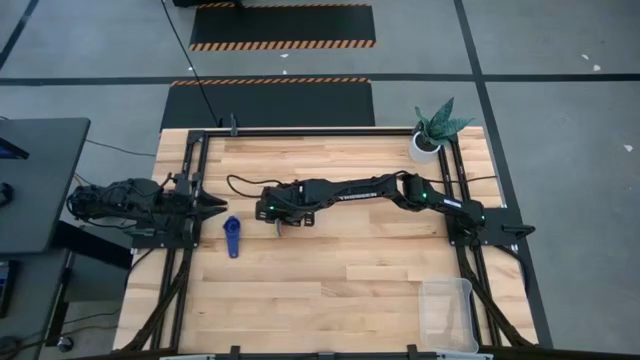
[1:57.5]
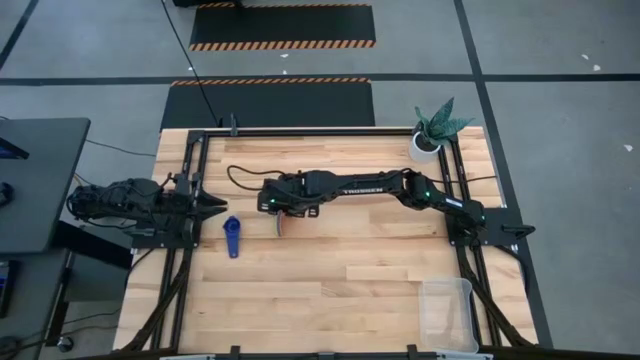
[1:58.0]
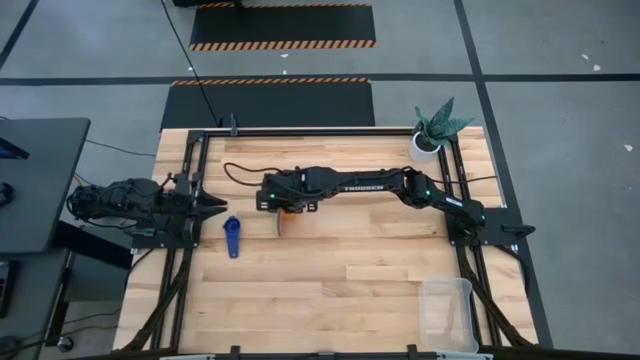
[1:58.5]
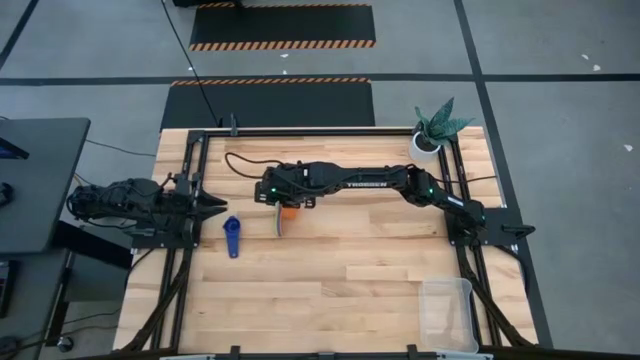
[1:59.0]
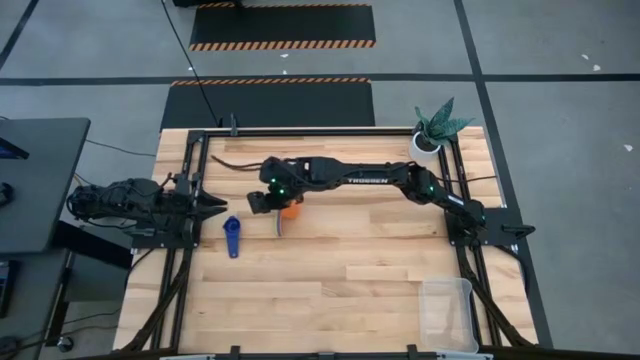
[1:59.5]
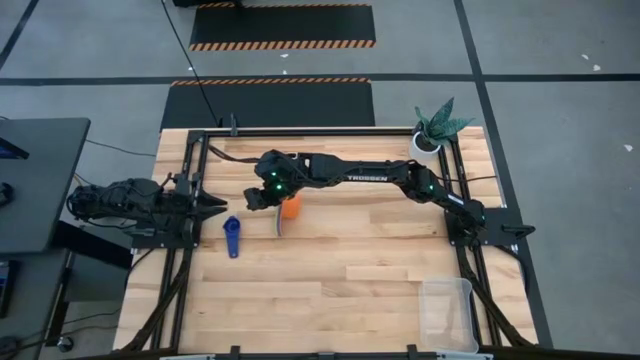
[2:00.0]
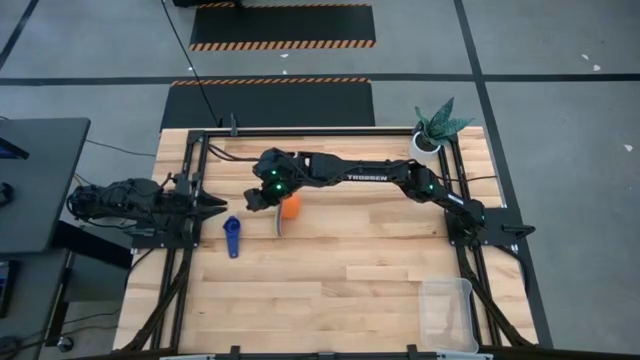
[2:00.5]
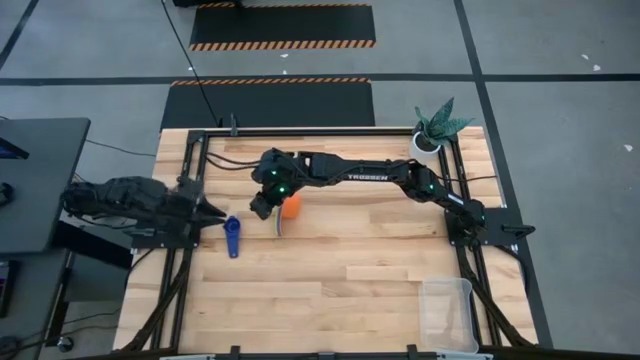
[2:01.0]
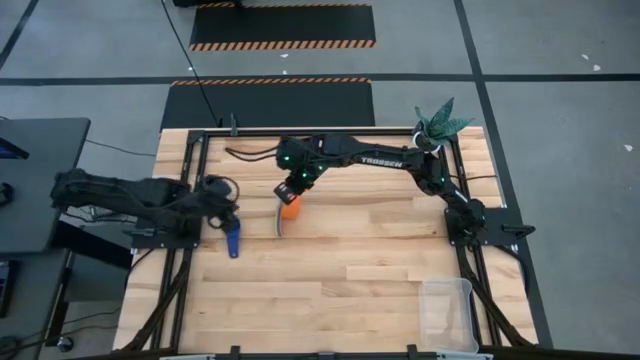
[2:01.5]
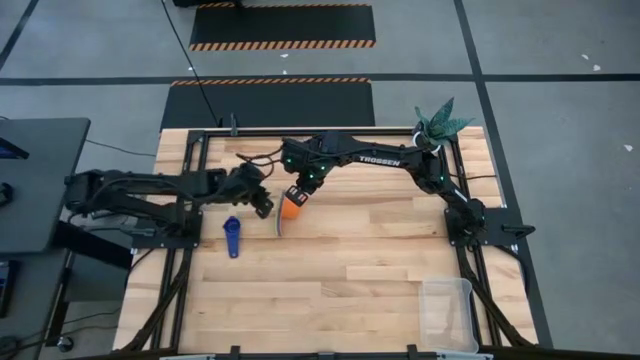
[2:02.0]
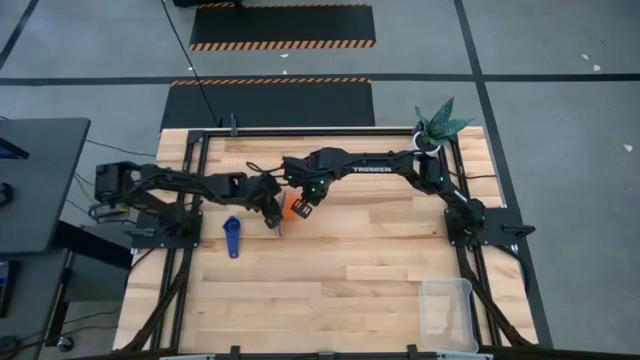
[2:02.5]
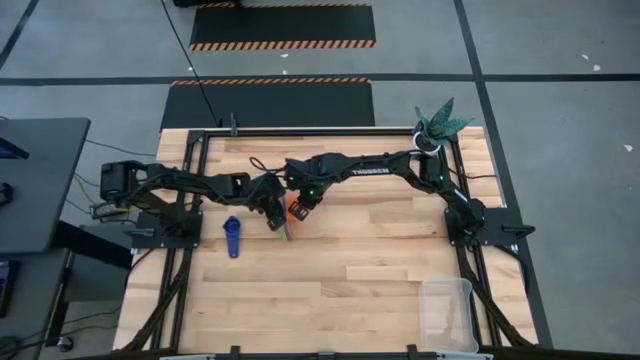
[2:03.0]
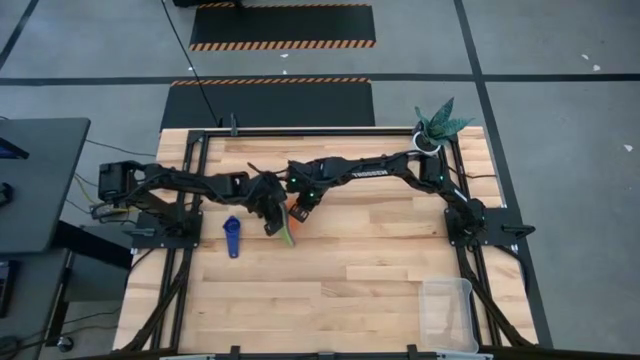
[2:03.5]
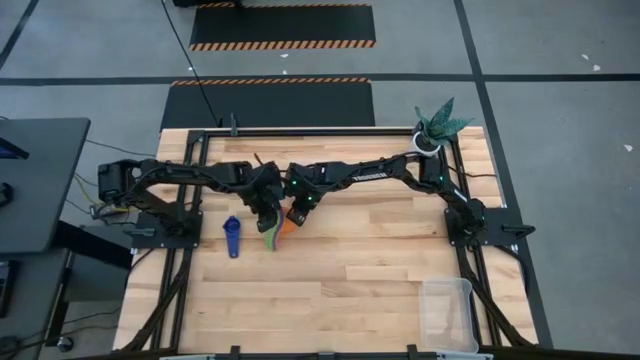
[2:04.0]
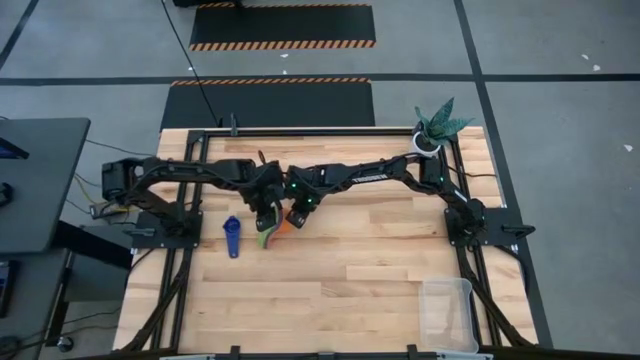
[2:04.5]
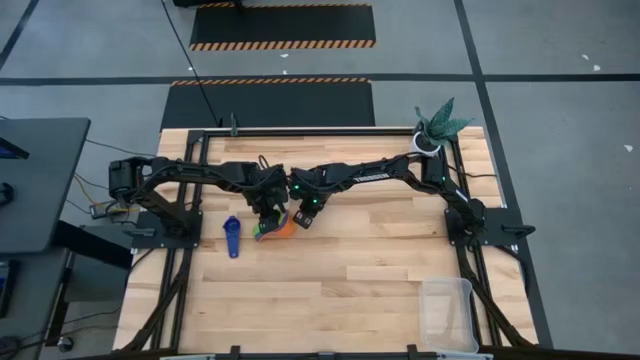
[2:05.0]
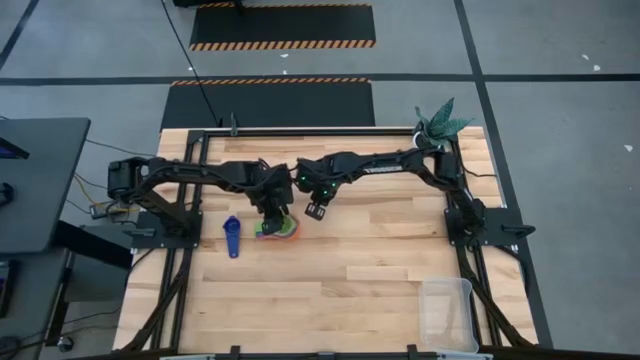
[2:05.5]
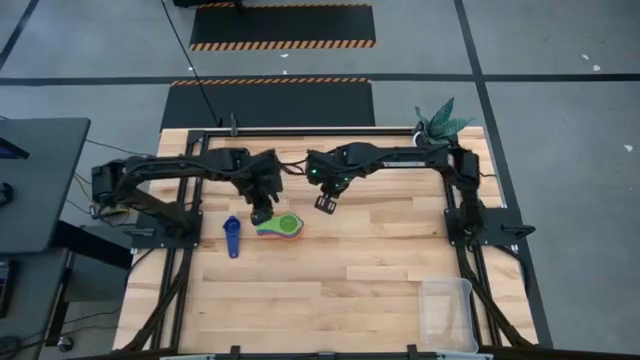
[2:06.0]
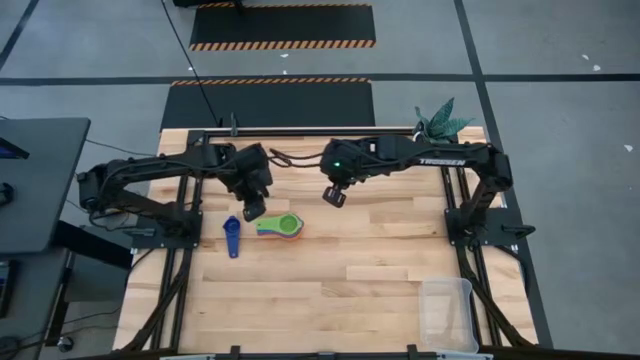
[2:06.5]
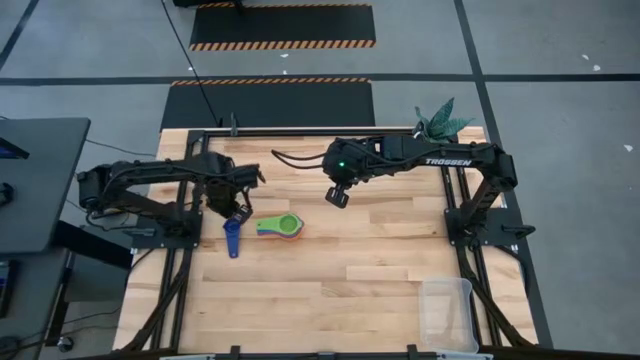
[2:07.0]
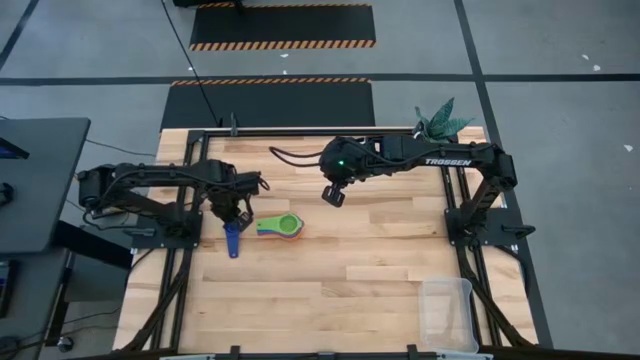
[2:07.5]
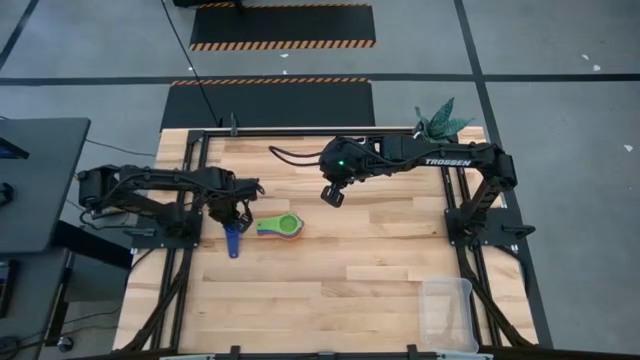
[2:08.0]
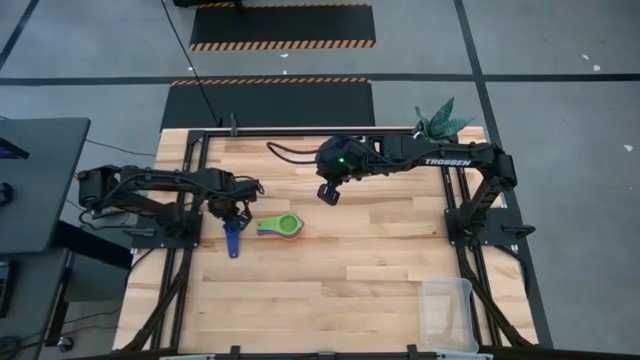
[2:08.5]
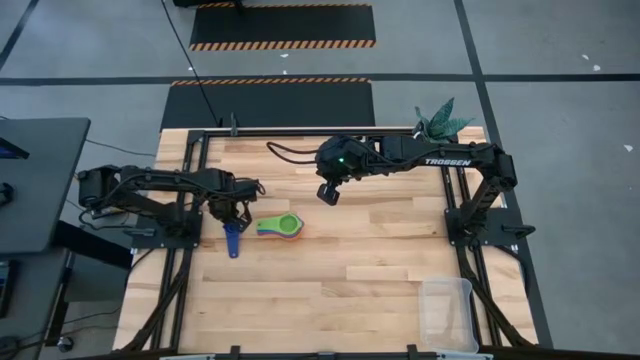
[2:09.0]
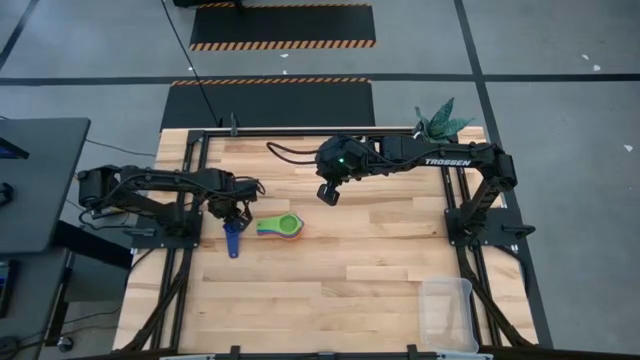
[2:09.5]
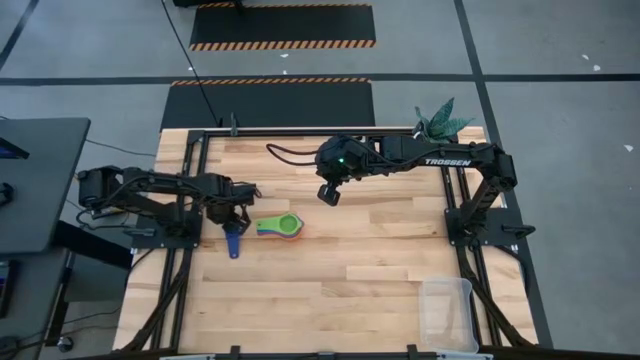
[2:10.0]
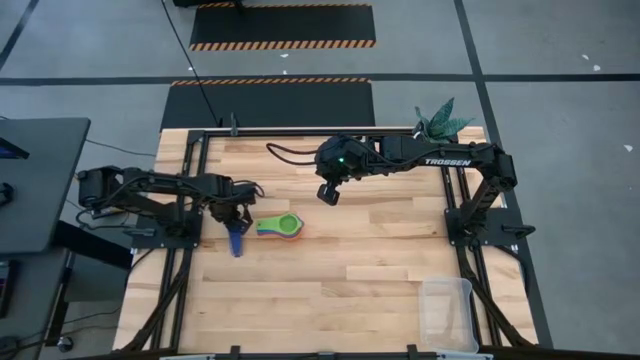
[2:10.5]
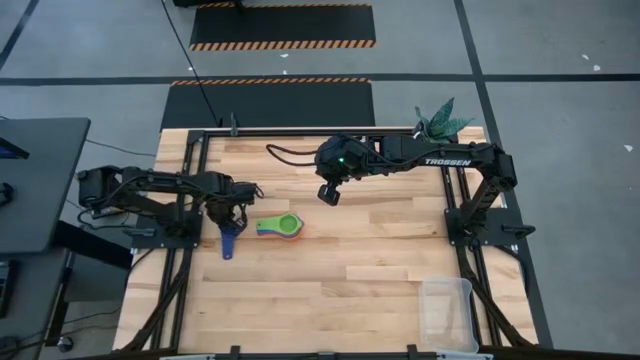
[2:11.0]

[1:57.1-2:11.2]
Task: Nest measuring cups in basket
Stack the dark blue measuring cup on top of the green measuring cup

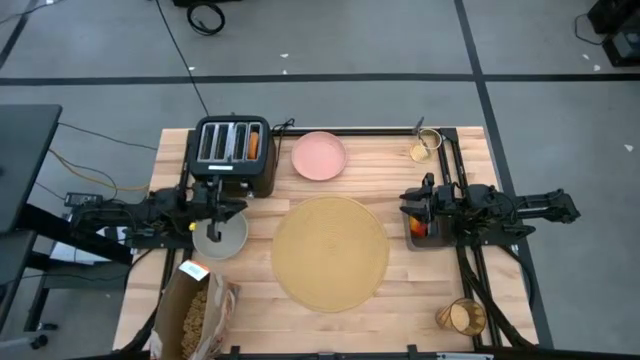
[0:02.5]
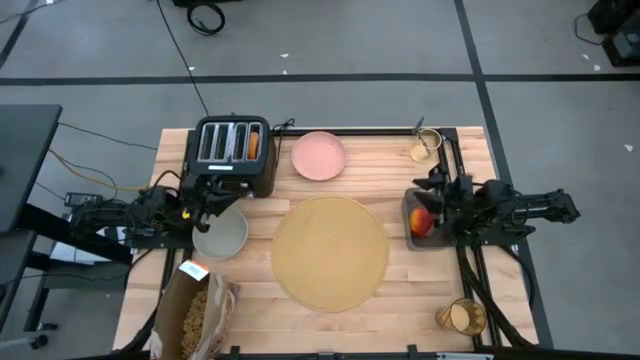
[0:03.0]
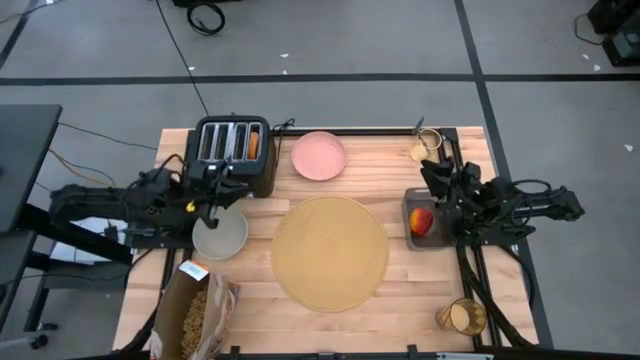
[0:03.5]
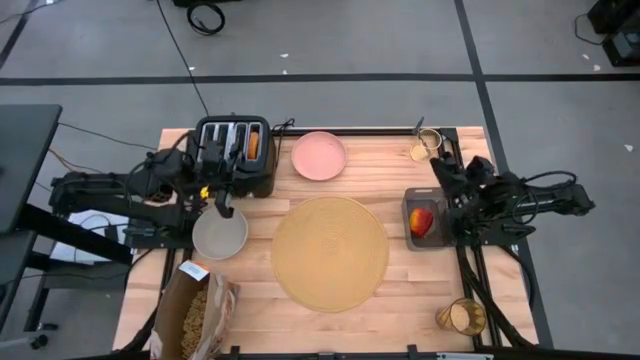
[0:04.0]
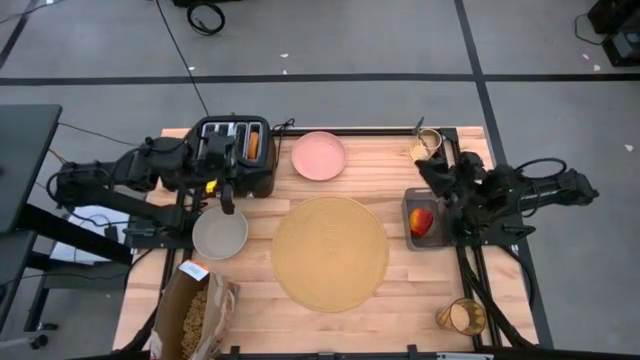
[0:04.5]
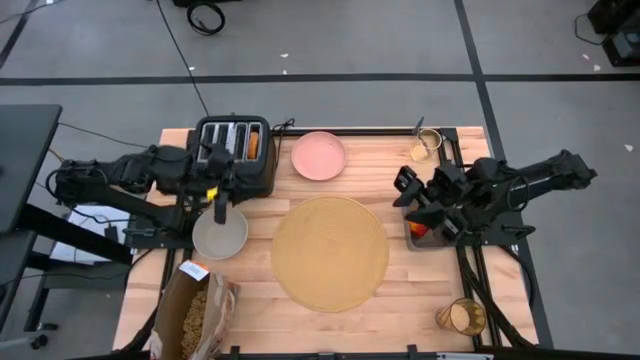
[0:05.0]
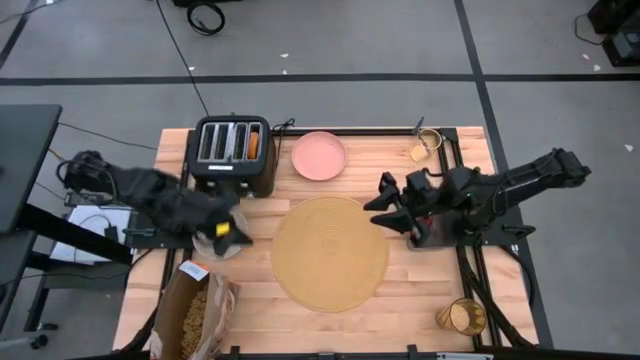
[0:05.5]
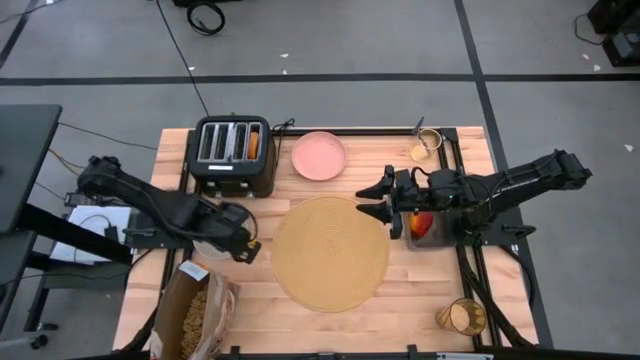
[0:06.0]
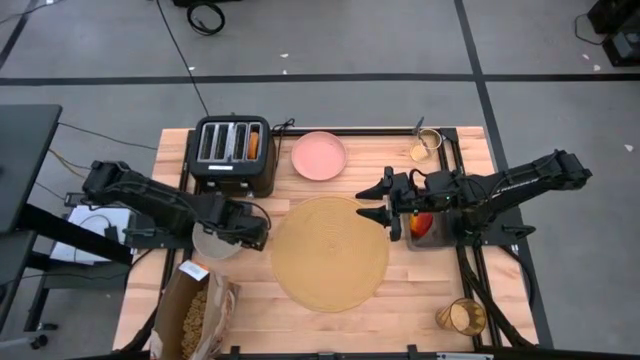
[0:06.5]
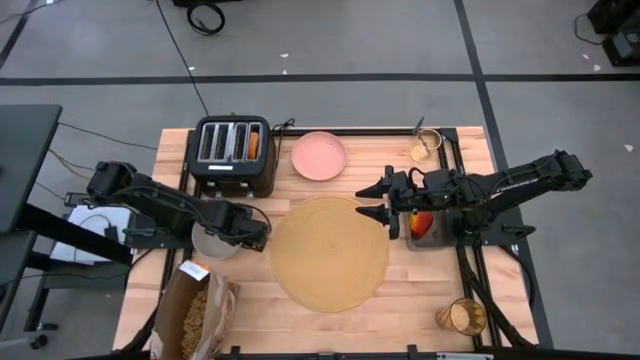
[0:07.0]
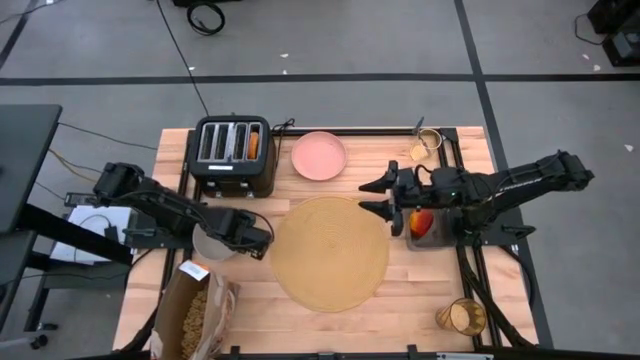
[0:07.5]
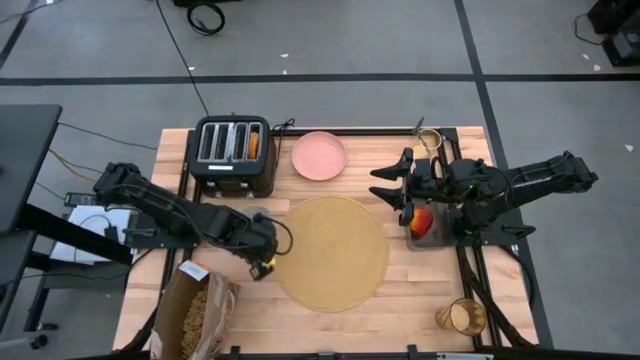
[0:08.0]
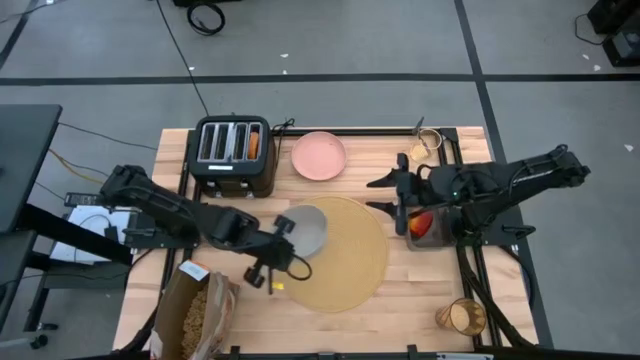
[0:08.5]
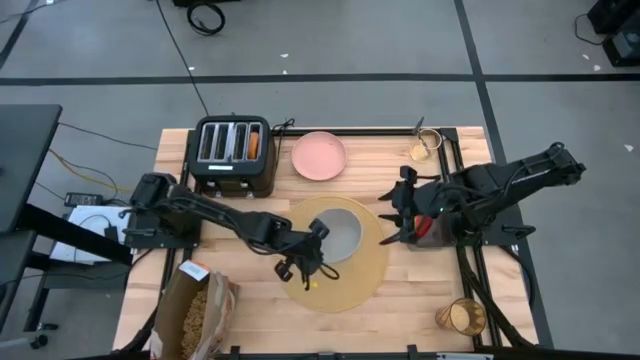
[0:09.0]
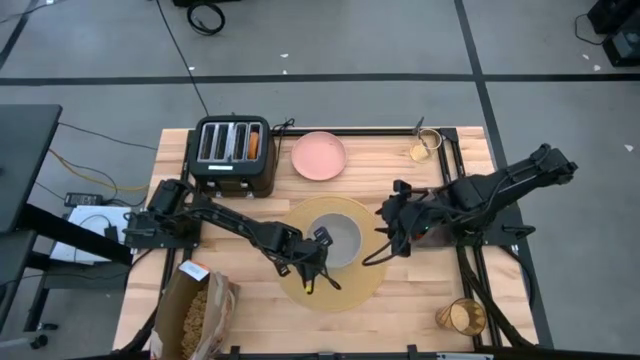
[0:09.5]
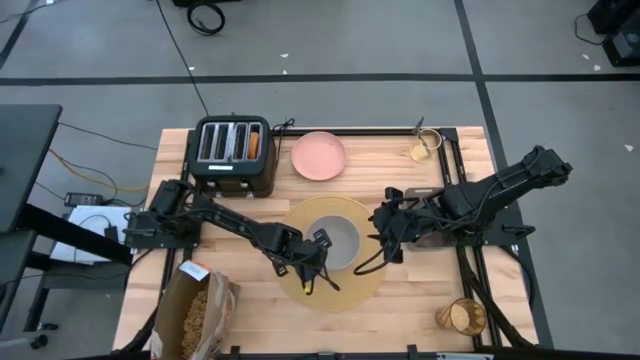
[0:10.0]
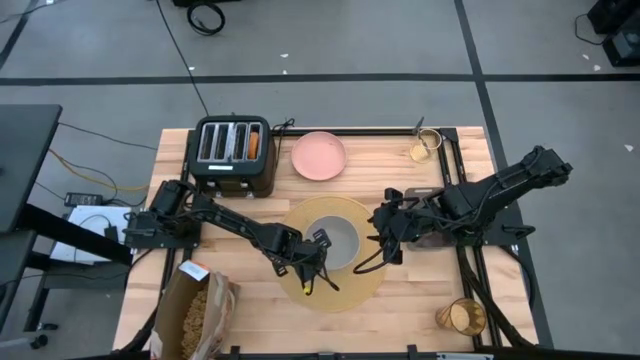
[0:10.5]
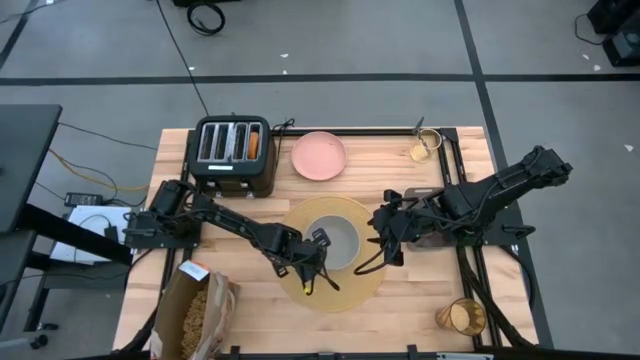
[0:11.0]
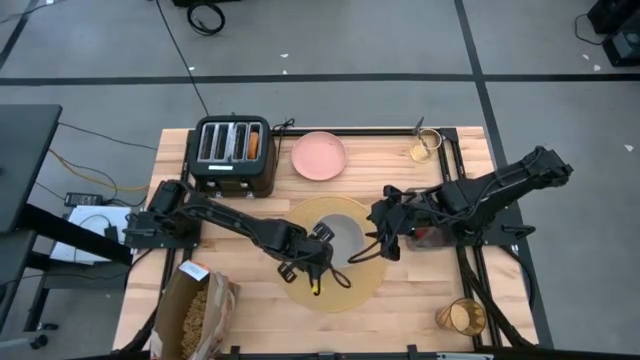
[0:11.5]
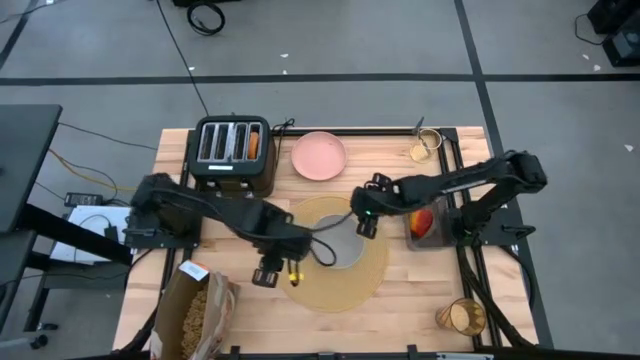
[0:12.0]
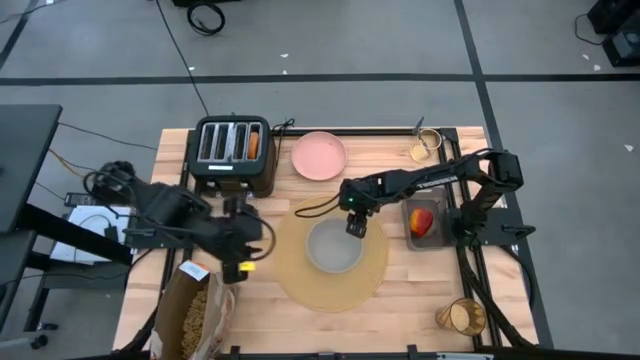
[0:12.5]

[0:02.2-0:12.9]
Task: Arrange a breakfast setting
Put the gray bowl on the yellow placemat
